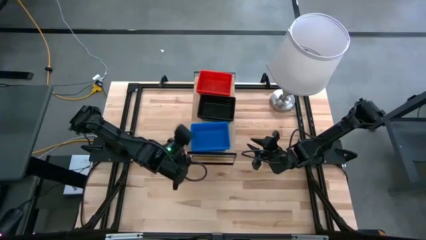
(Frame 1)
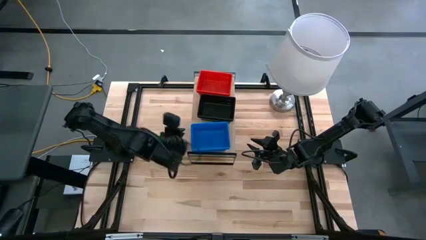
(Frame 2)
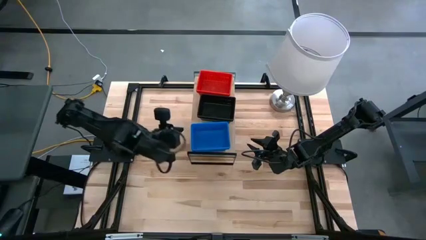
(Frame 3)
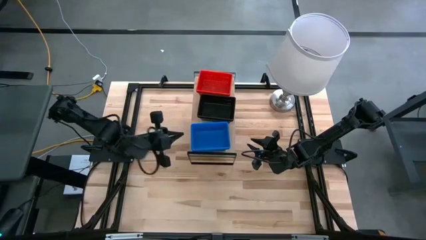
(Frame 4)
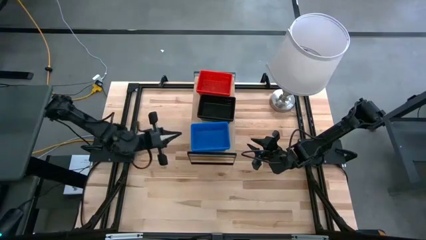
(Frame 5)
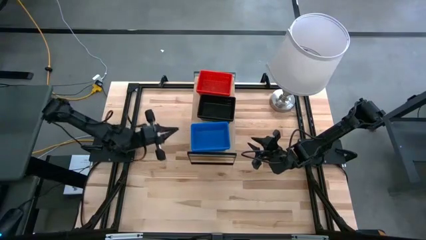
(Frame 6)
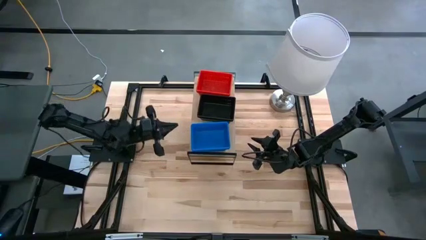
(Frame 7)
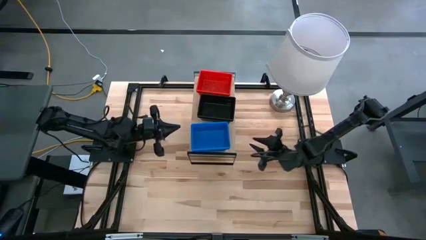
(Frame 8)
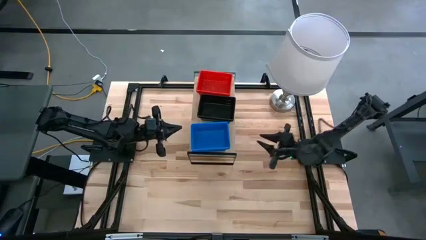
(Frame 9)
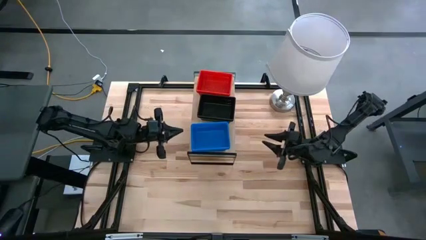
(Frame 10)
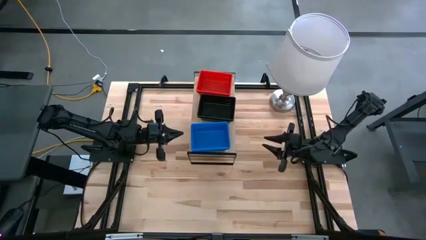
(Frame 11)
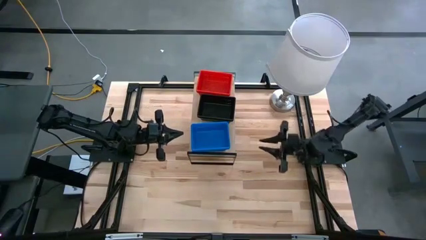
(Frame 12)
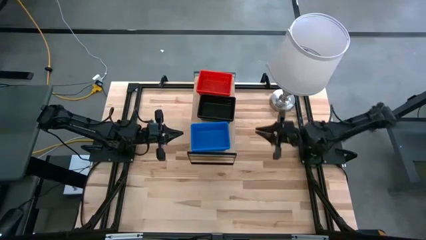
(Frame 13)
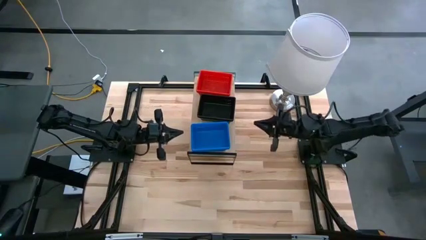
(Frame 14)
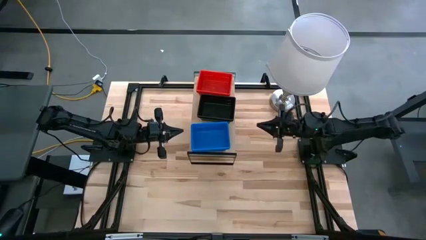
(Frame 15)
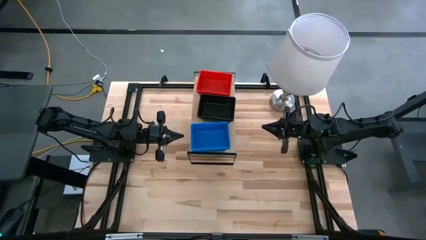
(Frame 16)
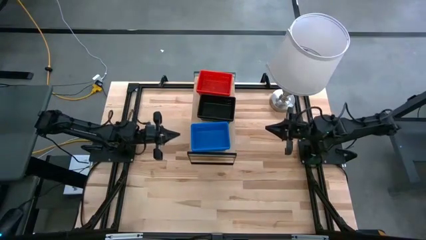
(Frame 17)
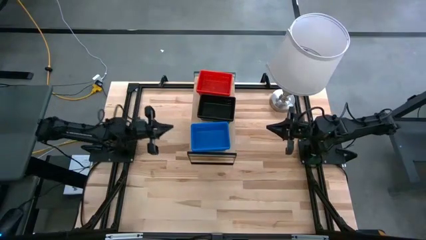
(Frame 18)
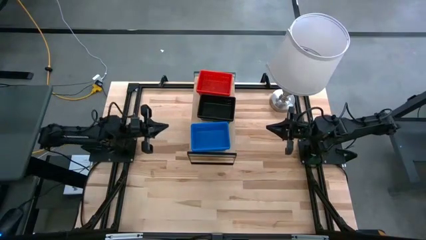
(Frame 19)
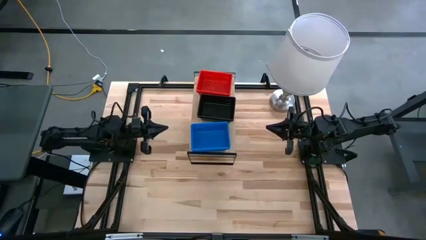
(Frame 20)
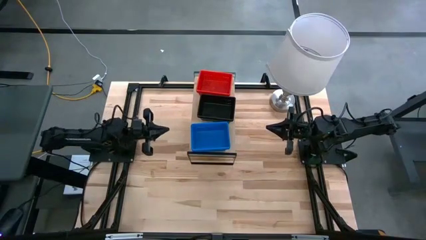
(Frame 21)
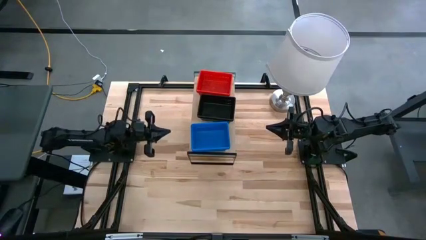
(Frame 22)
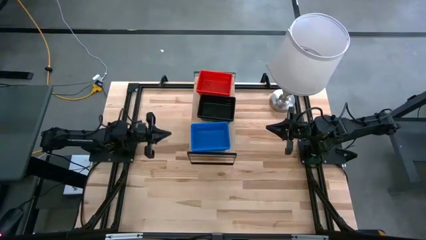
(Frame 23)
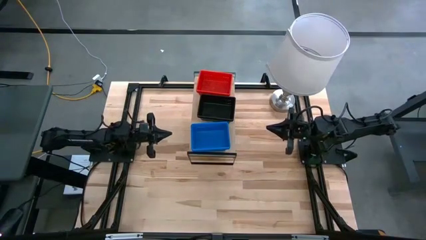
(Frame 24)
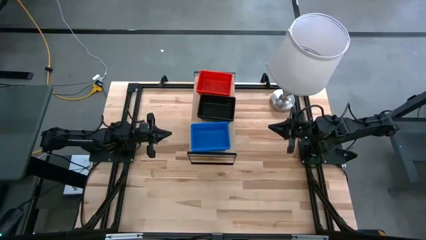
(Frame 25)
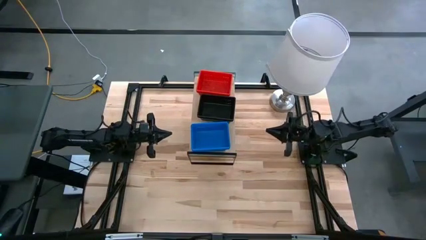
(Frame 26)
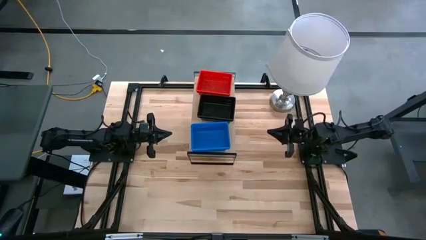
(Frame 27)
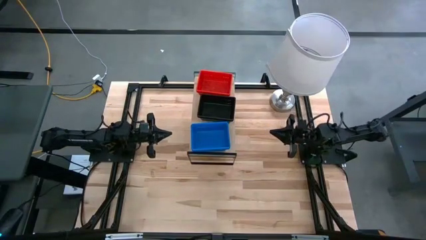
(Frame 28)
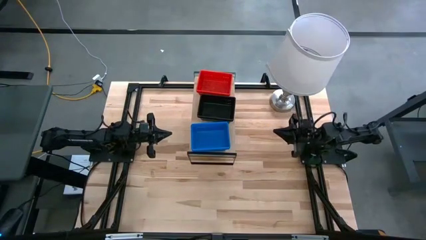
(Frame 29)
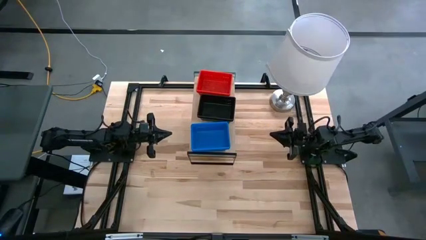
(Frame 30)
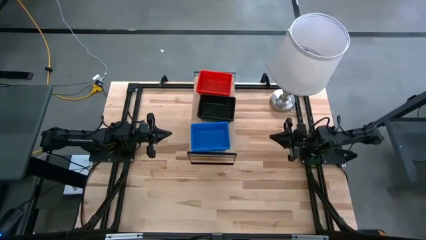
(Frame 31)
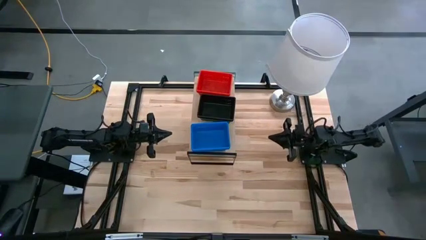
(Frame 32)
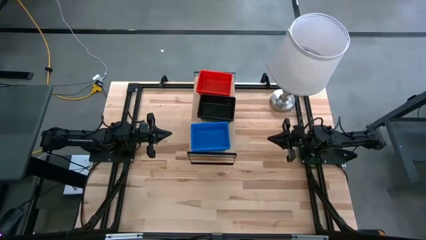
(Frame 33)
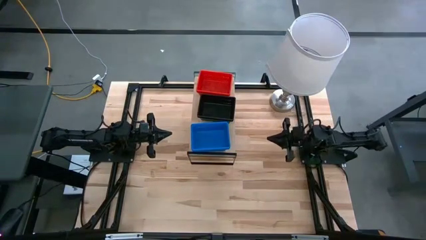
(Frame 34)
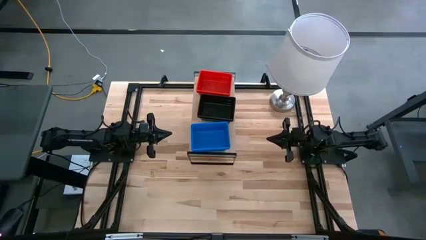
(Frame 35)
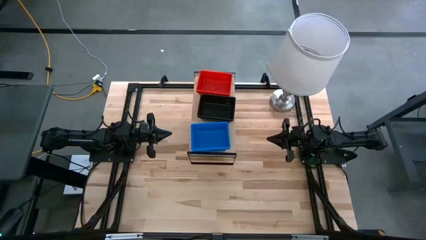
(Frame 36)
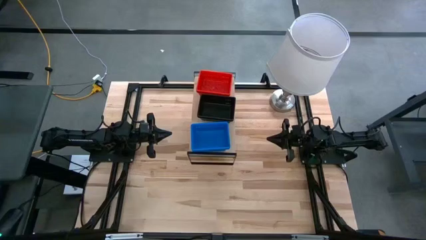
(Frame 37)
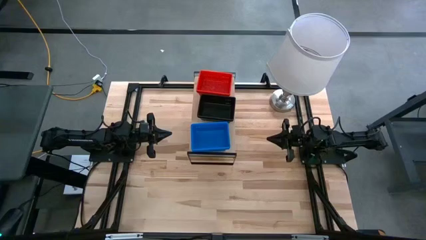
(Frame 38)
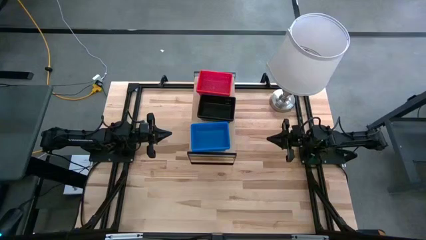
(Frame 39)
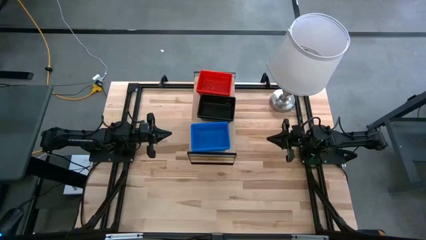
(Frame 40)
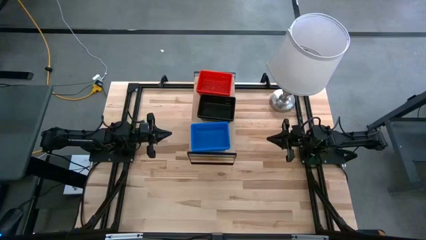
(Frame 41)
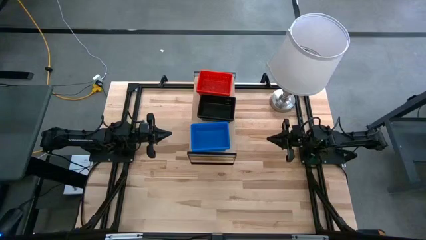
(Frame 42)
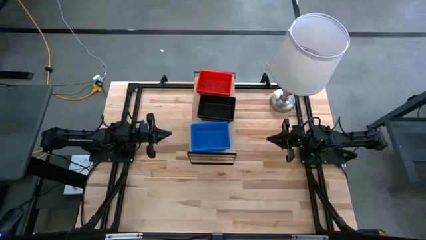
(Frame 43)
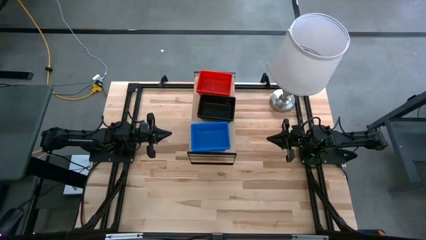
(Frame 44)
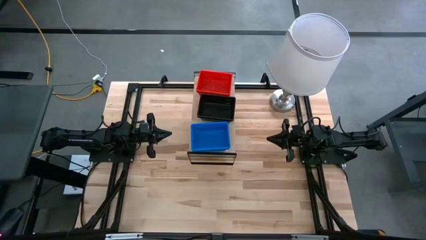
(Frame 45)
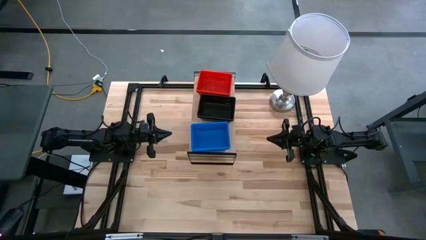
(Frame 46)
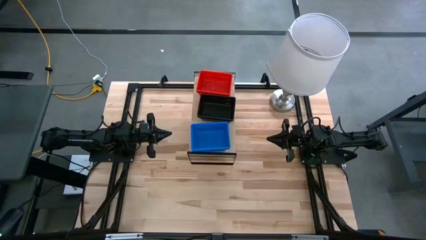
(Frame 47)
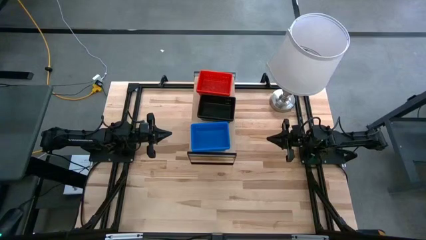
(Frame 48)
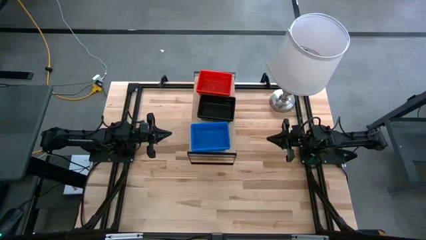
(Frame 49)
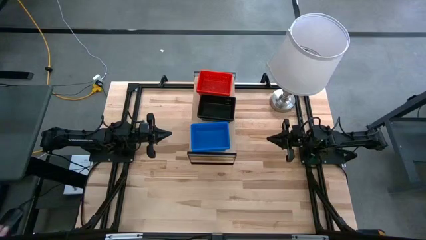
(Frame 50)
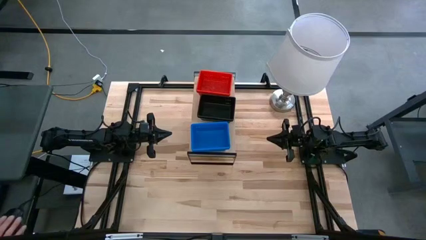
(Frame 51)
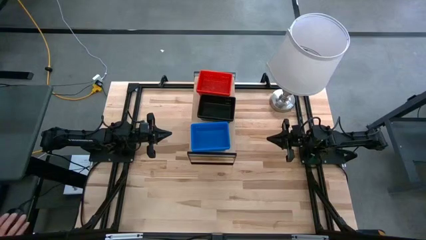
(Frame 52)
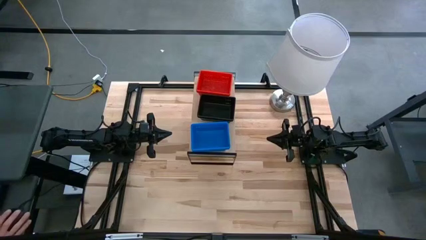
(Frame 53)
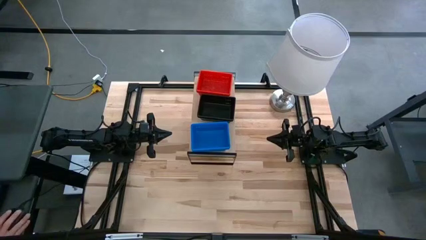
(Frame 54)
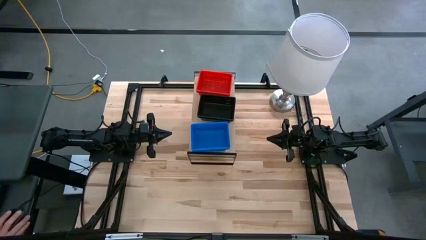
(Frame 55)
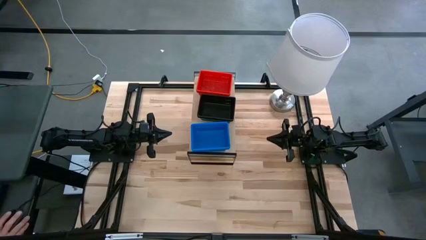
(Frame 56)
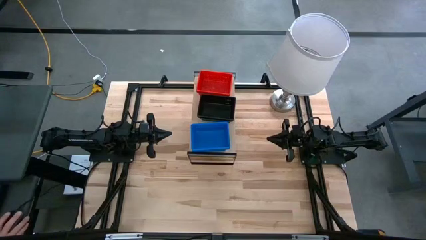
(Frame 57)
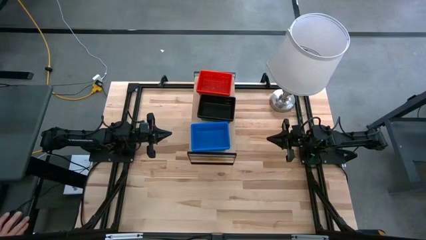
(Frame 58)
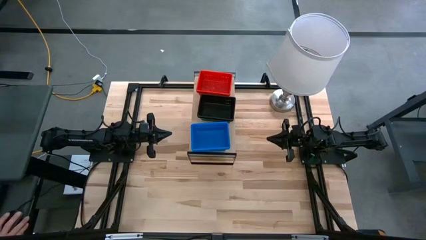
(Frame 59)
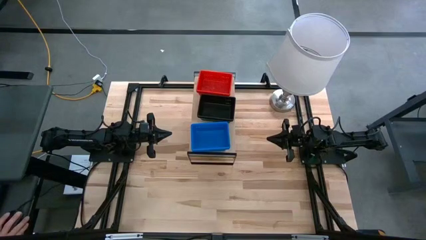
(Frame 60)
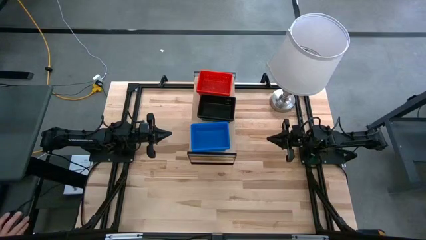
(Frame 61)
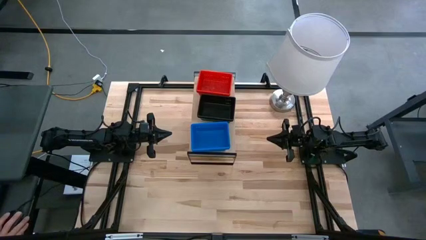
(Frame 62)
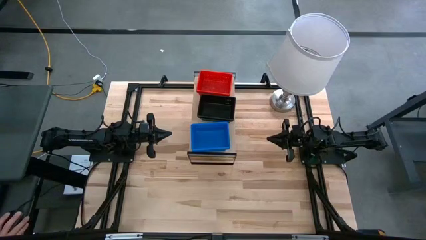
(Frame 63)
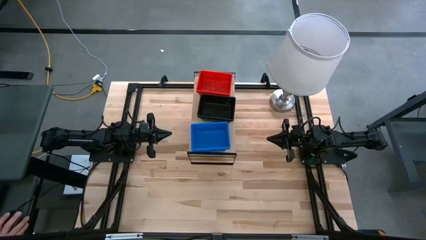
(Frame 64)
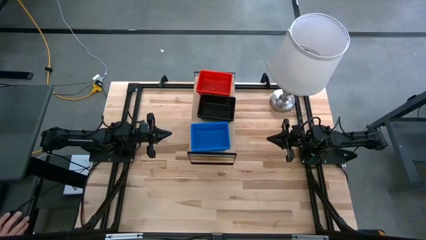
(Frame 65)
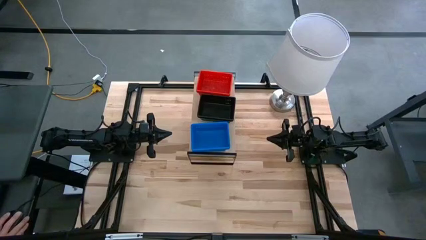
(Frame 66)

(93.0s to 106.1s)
Task: Stack baskets on shelf by color
Return to Home Position
